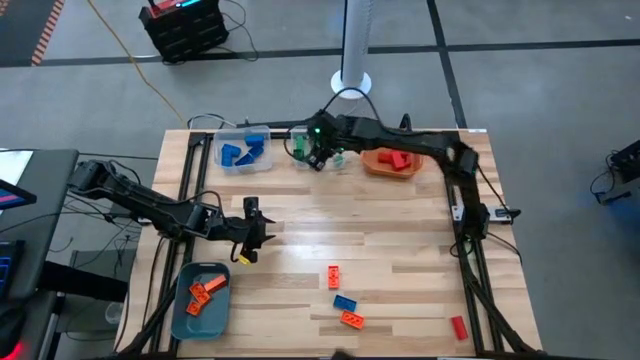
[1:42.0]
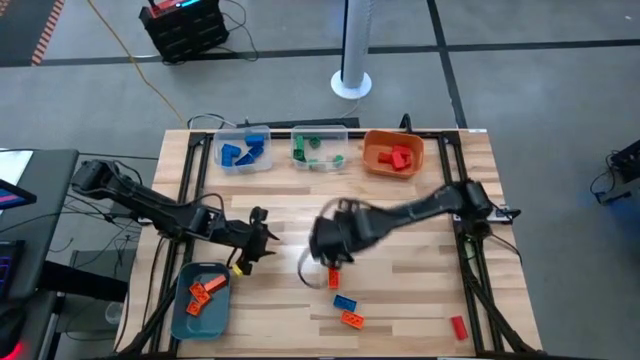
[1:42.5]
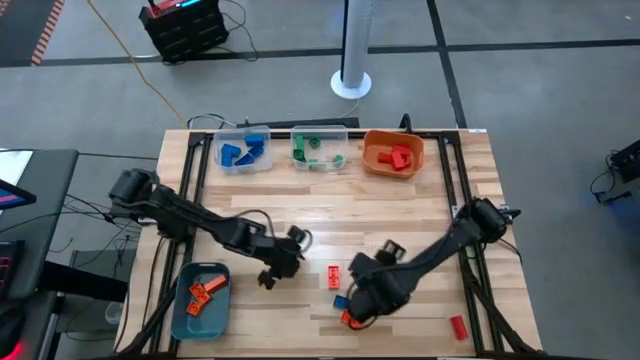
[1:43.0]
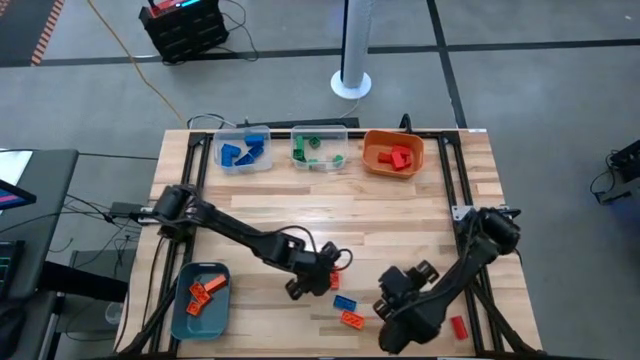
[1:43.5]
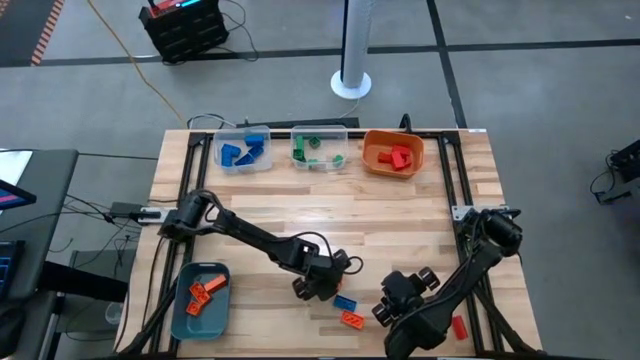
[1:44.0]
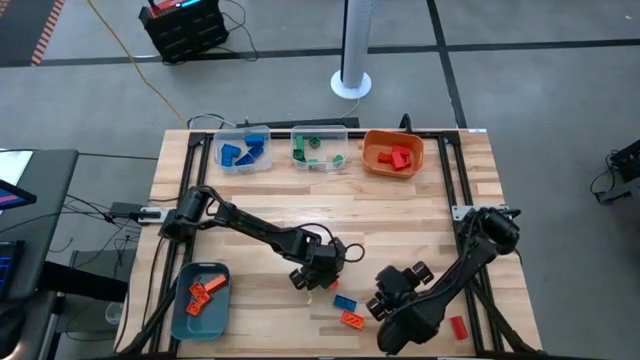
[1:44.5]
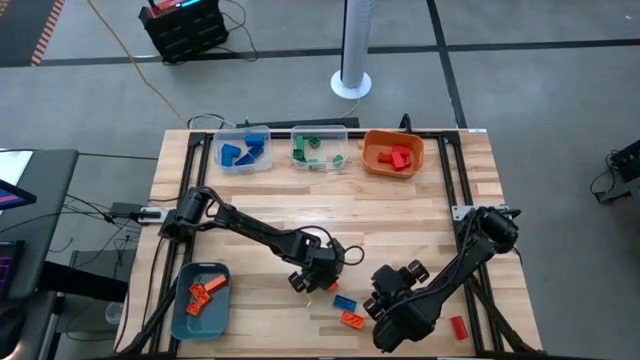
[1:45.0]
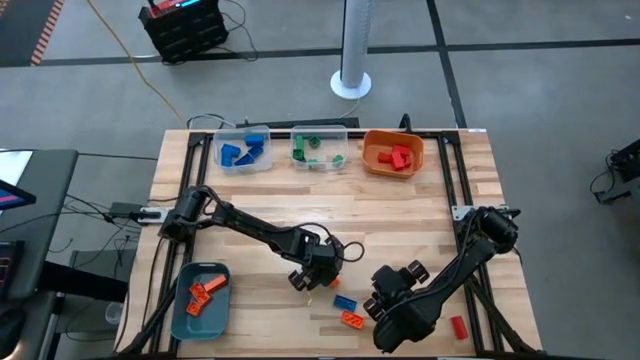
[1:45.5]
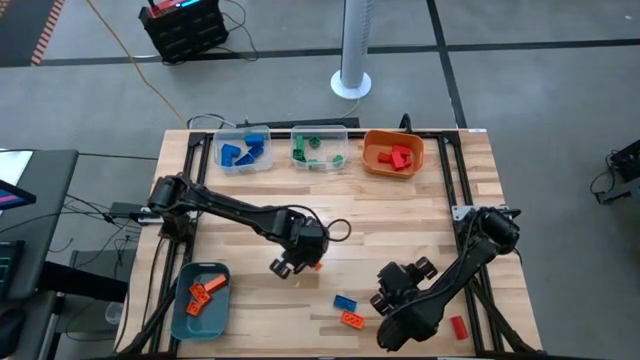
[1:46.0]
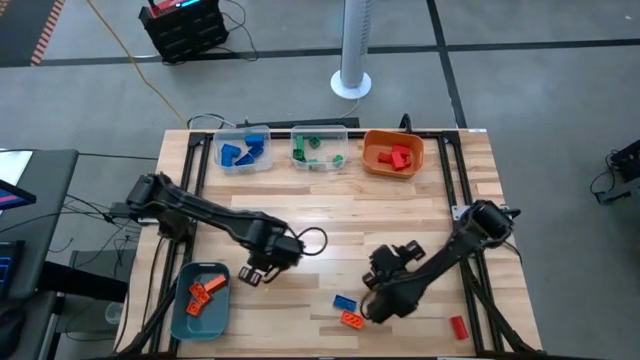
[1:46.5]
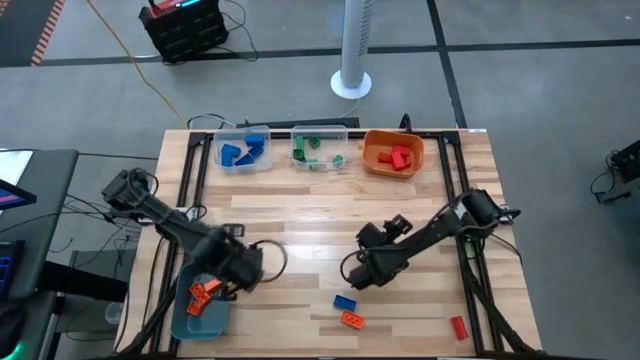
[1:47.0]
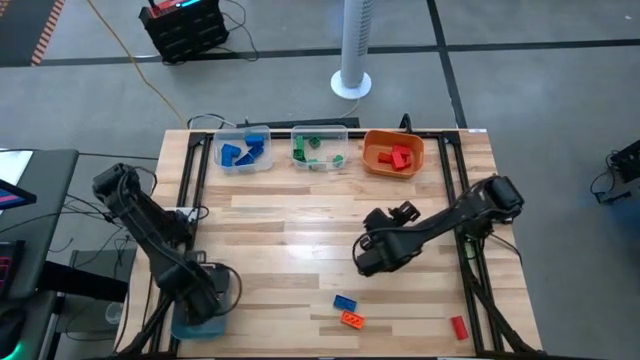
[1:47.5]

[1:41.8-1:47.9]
Task: Sort blocks
Put the orange game piece into the blue bin

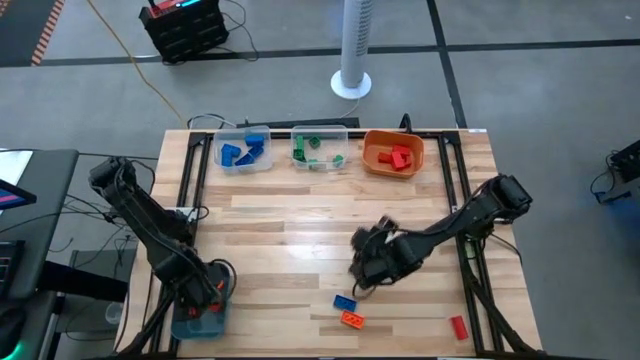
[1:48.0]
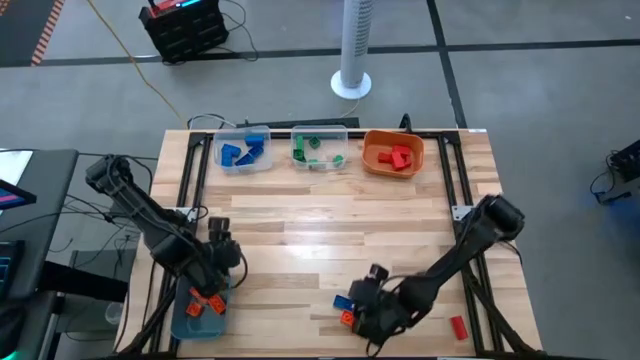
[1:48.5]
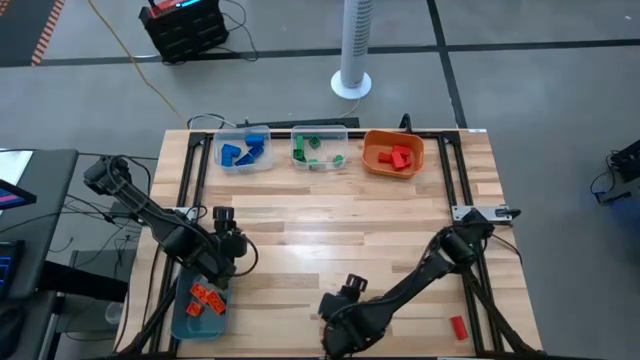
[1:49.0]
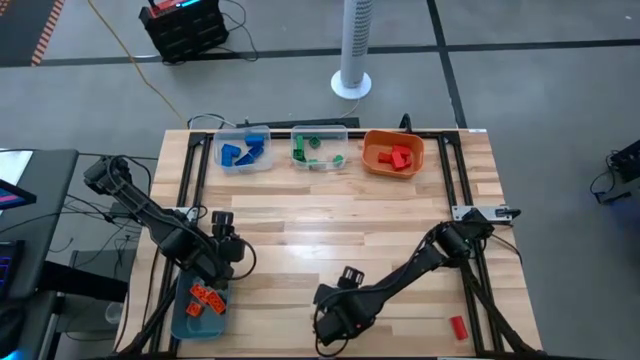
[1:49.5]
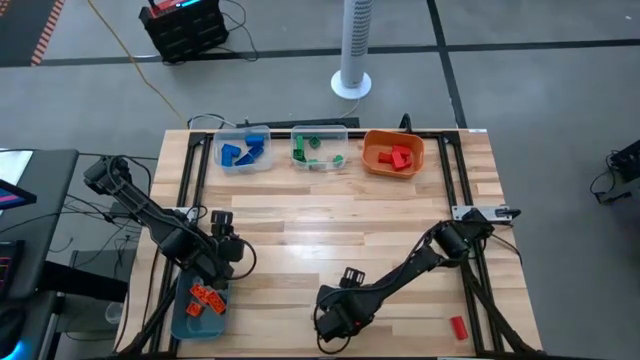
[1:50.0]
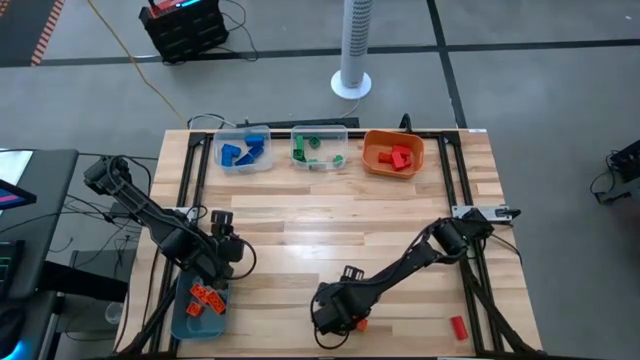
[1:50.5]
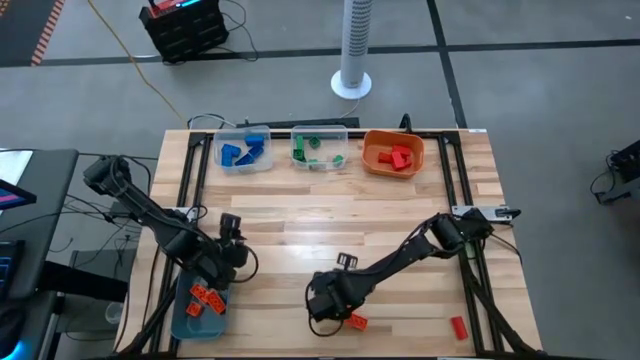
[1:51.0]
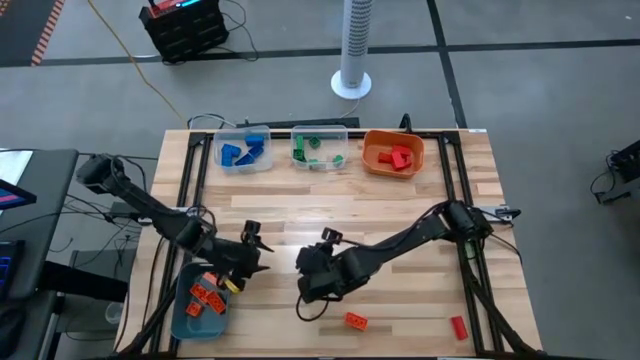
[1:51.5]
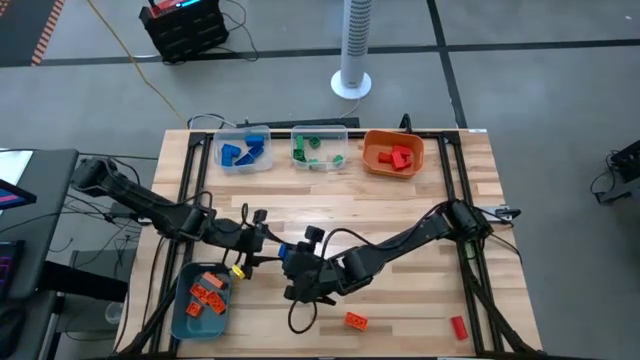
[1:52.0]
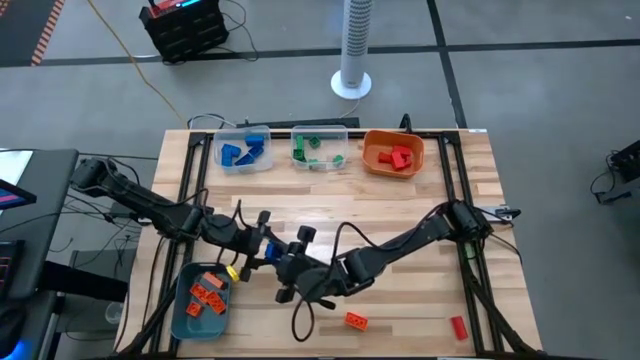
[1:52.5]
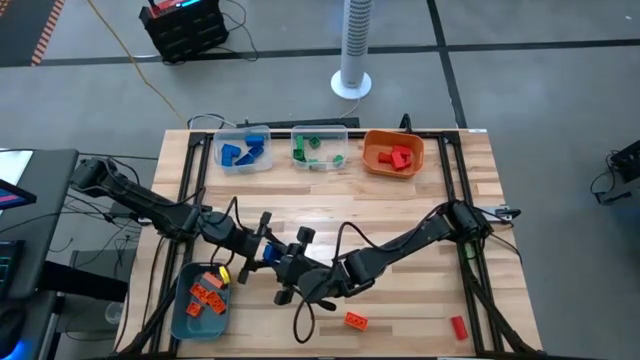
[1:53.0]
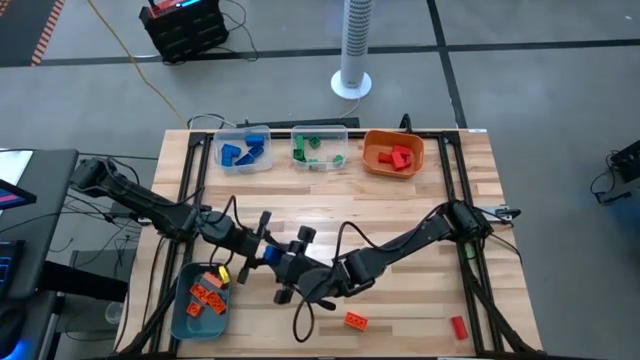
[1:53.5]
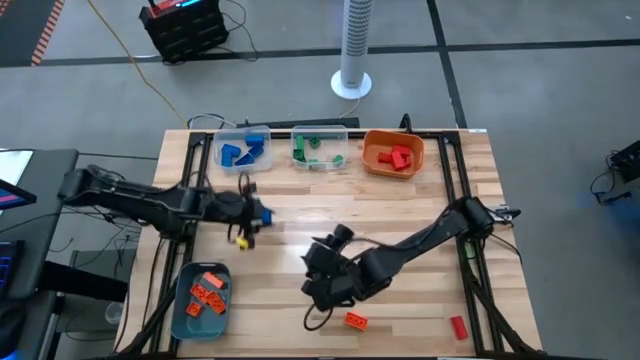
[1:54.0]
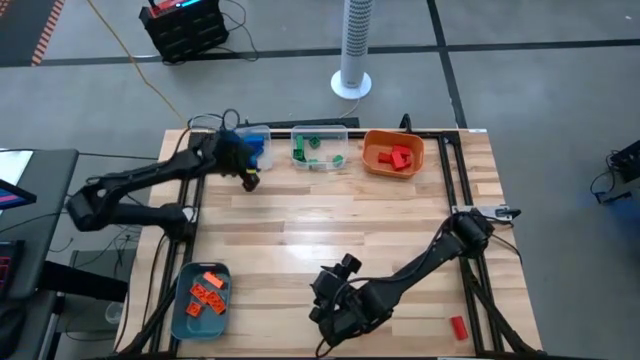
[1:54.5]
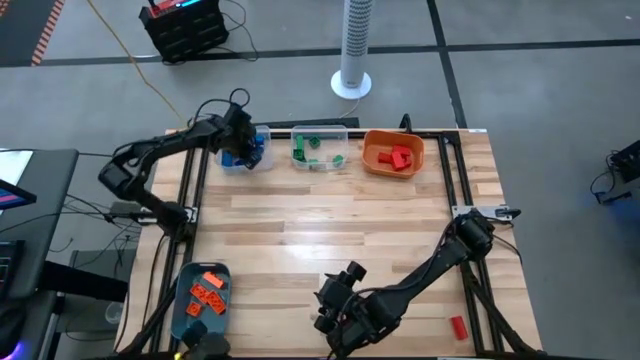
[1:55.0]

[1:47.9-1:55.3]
Put the blue game piece into the left transparent bin

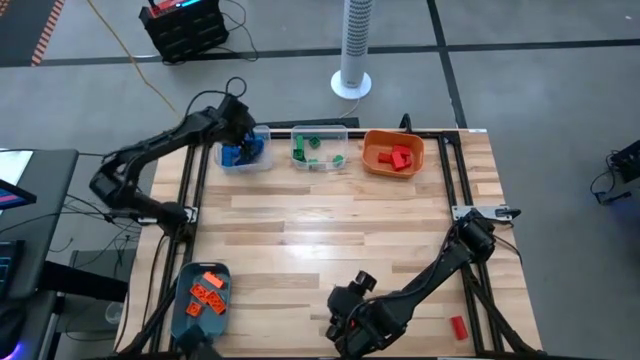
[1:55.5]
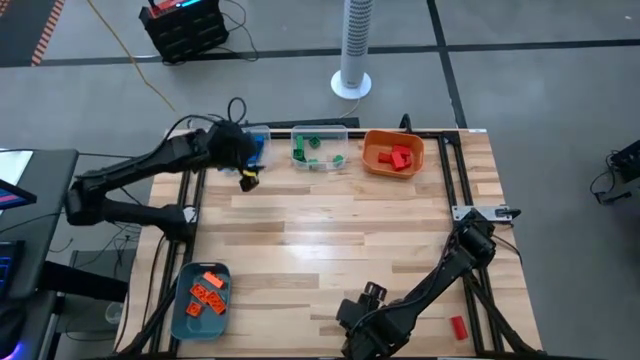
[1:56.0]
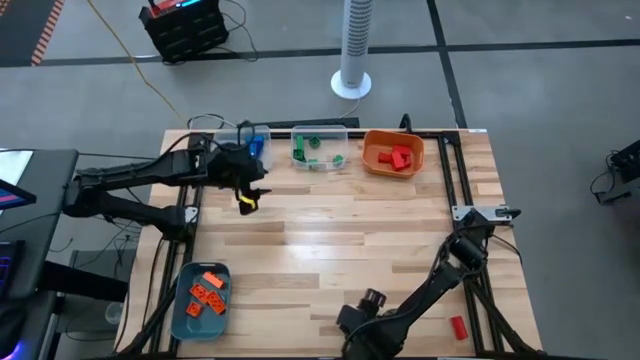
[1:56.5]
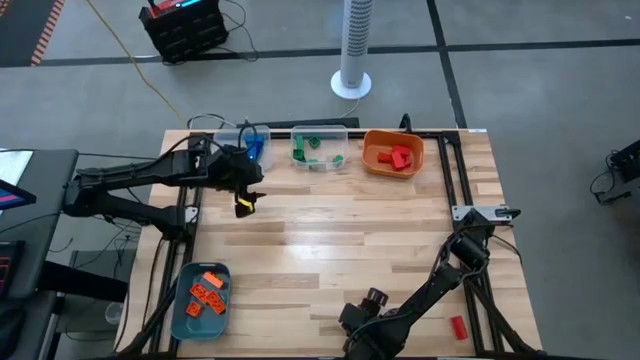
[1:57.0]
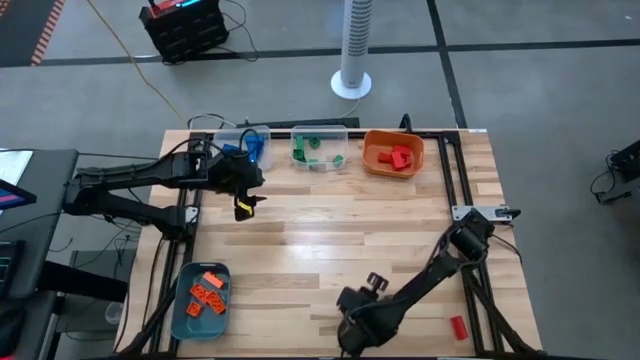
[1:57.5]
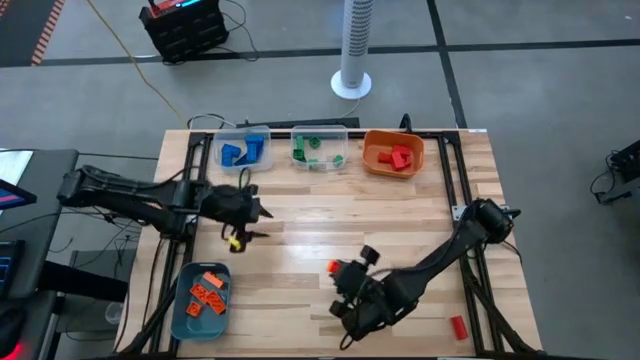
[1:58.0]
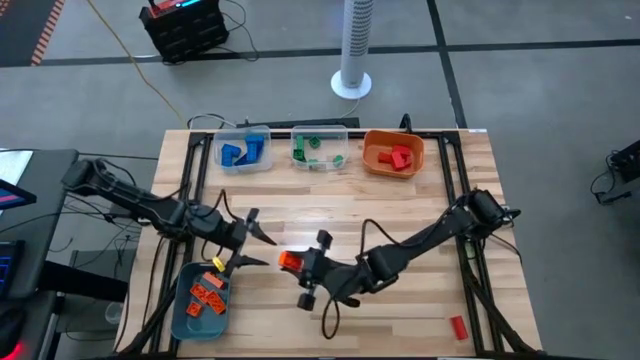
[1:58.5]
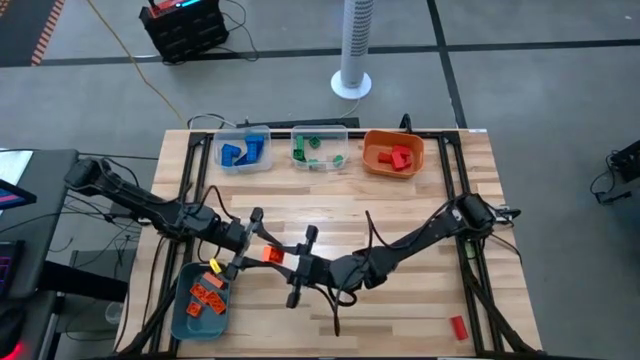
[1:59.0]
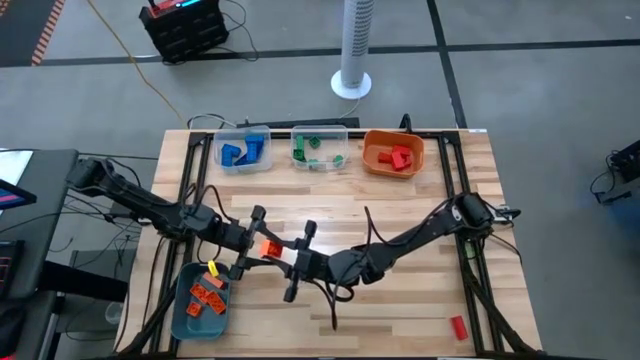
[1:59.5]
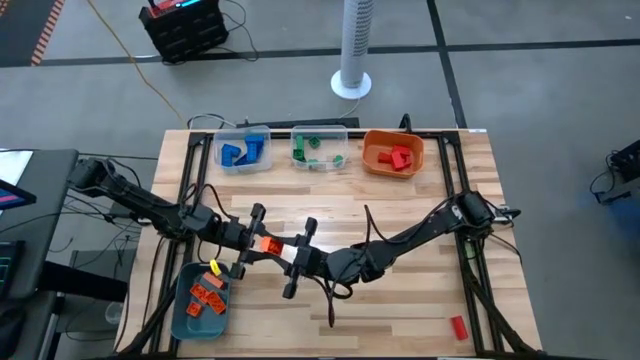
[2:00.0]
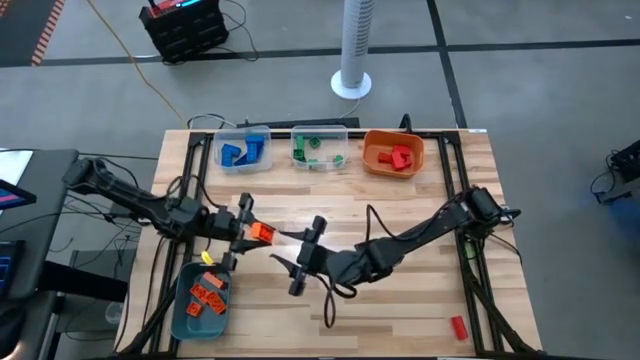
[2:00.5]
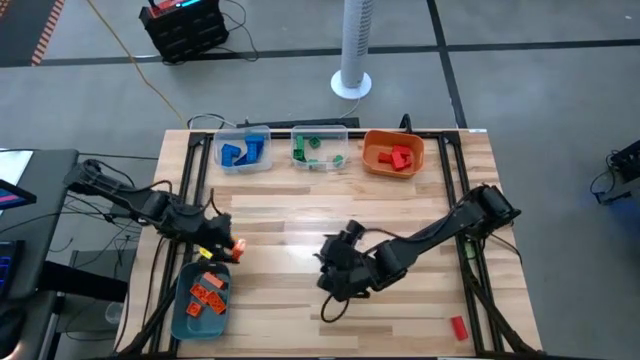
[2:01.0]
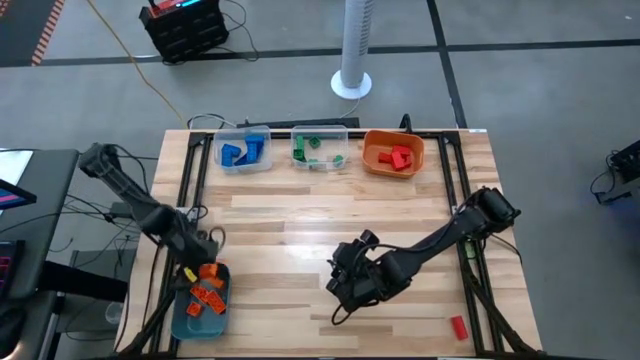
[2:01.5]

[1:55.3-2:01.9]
Put the orange game piece into the blue bin
